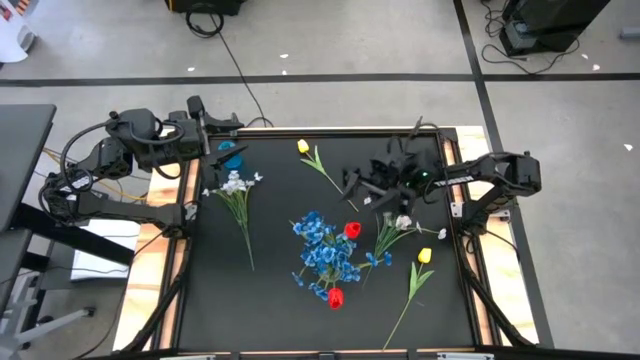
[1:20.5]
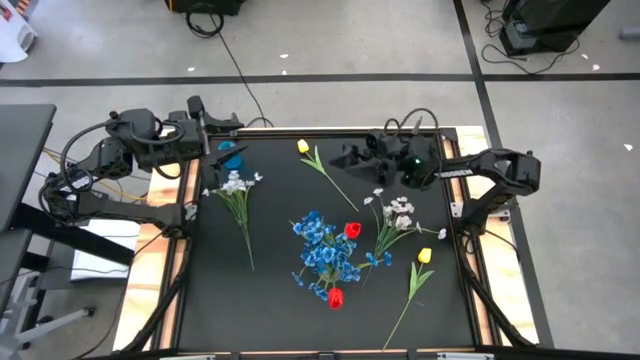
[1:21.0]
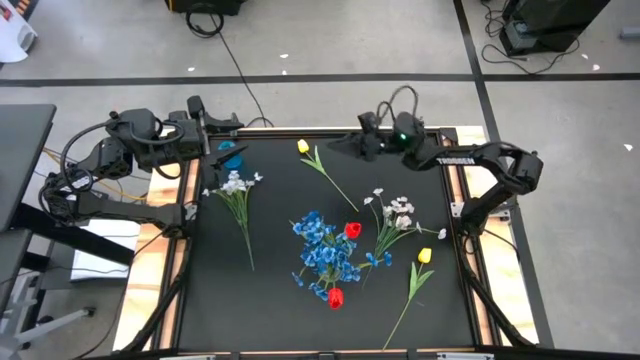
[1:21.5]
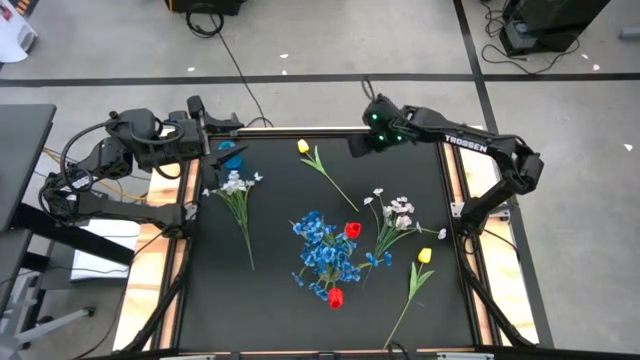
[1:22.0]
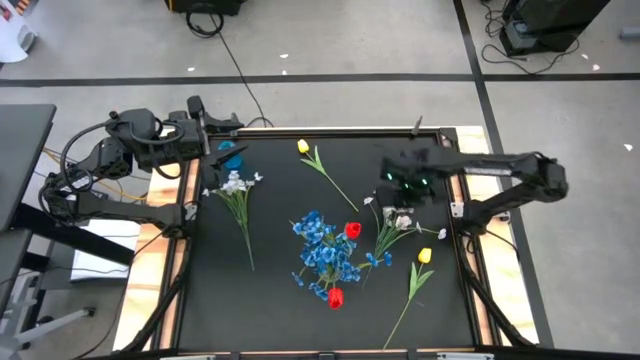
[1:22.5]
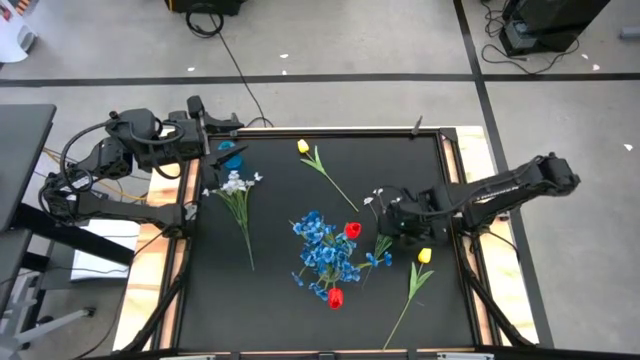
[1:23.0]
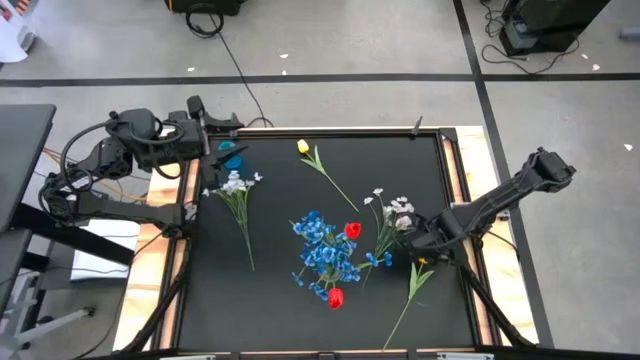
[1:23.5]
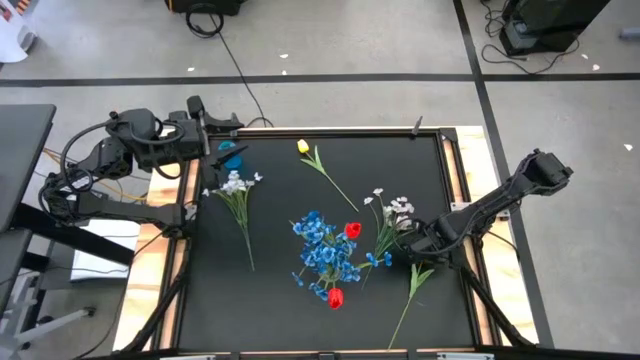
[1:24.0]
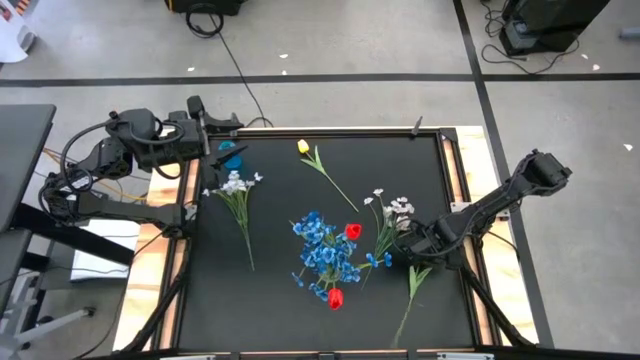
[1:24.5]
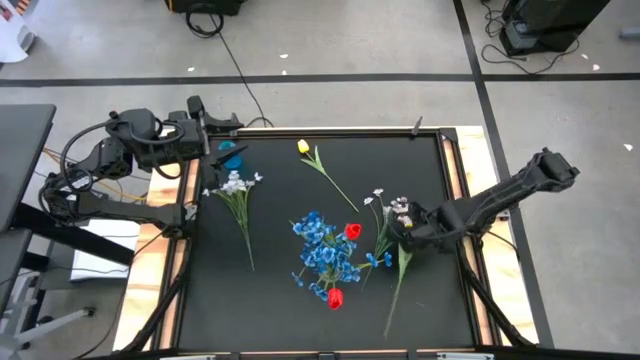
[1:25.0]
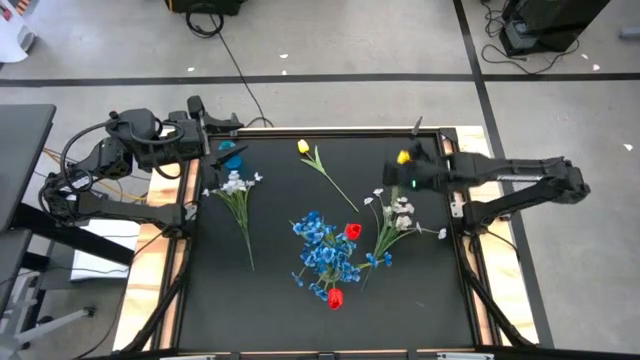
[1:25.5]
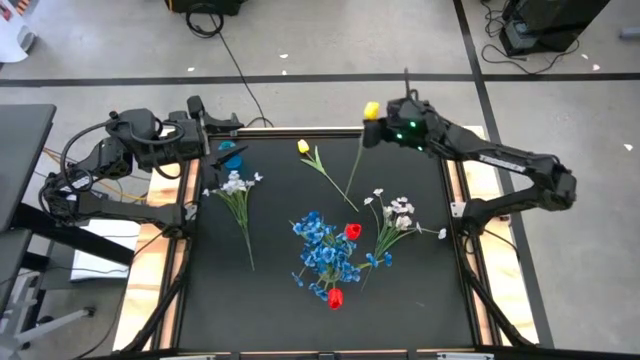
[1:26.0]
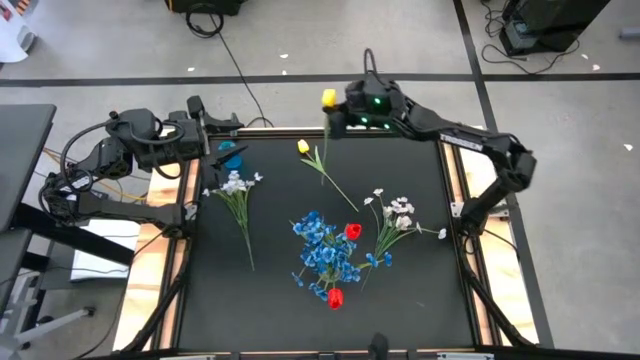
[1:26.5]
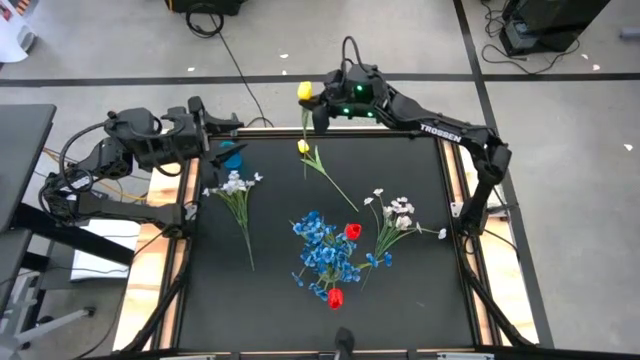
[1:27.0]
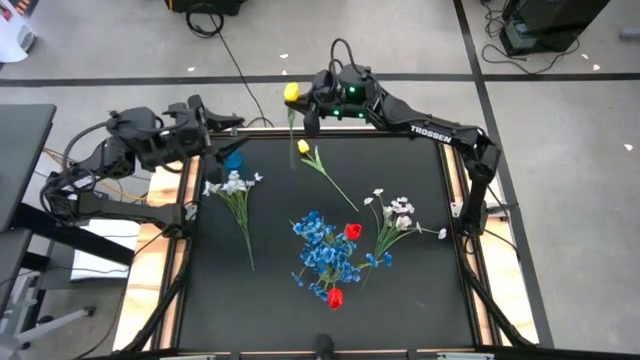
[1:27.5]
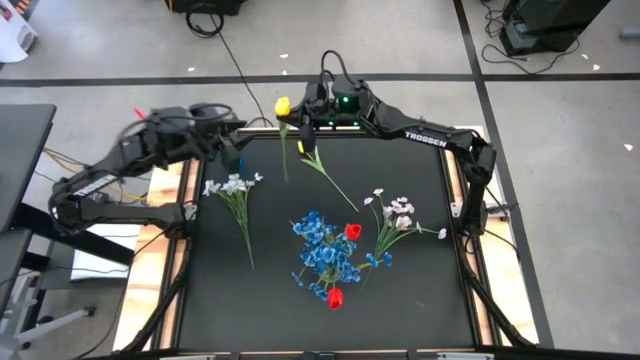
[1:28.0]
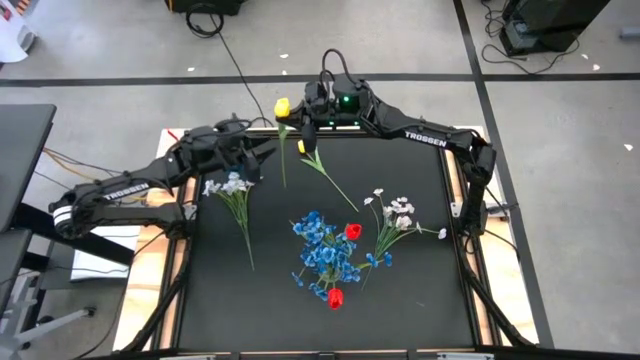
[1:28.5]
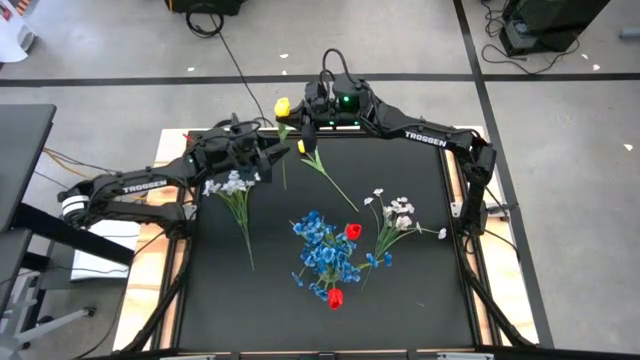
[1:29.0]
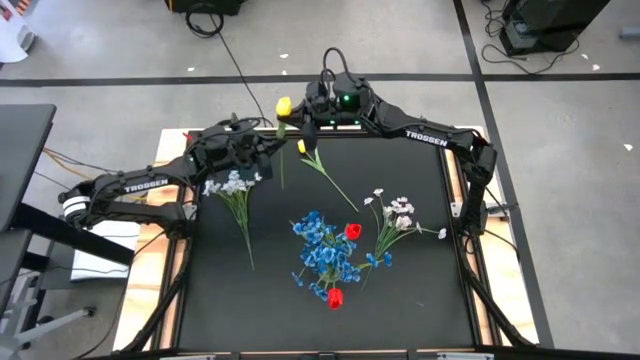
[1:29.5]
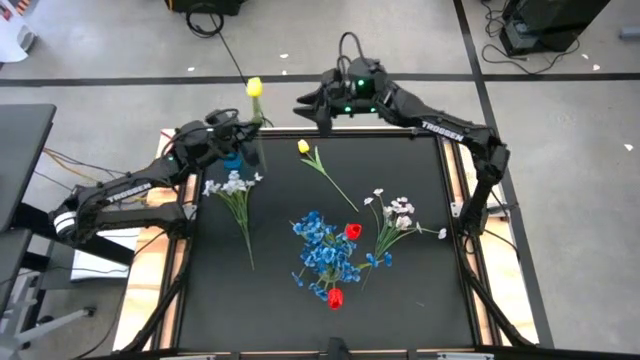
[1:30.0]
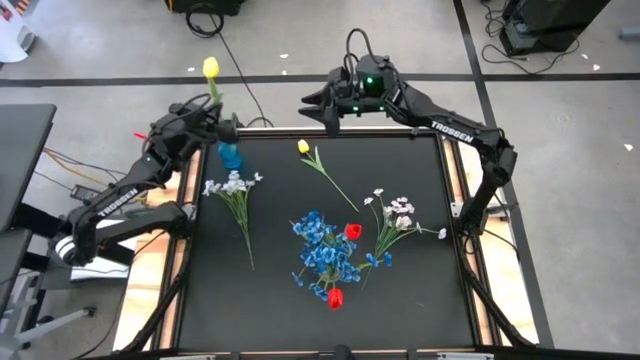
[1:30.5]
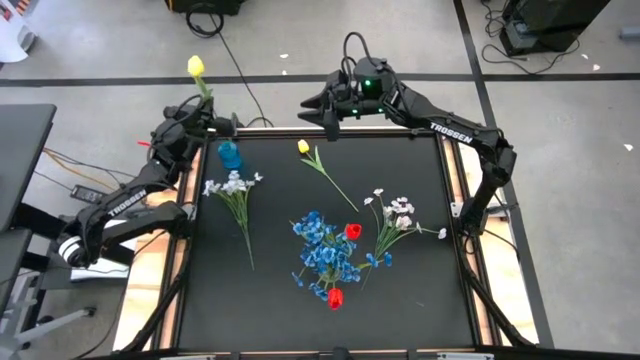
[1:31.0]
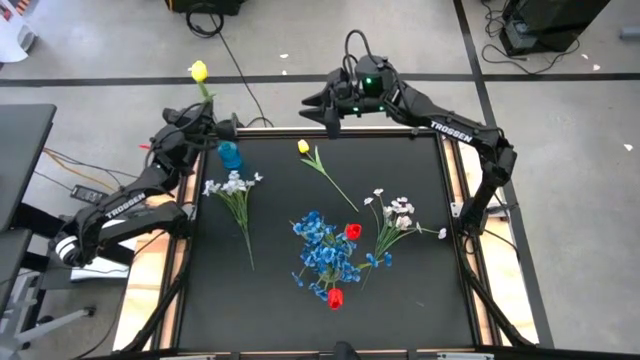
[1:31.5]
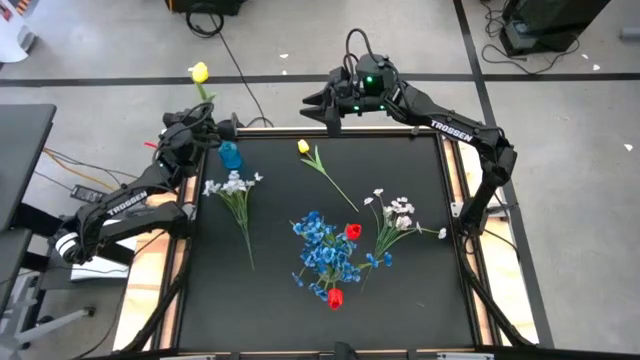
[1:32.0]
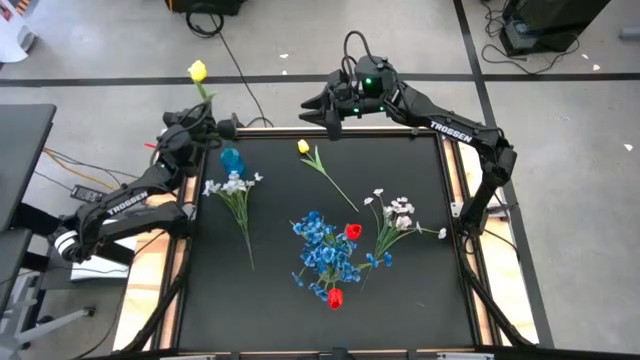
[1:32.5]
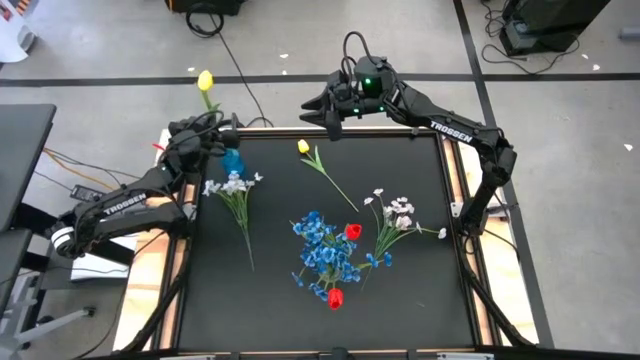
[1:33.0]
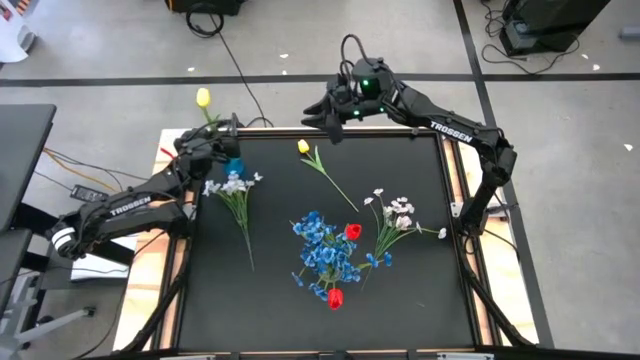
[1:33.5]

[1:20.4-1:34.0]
Task: Sort flowers into vase by color
Put the bottom yellow flower into the blue vase

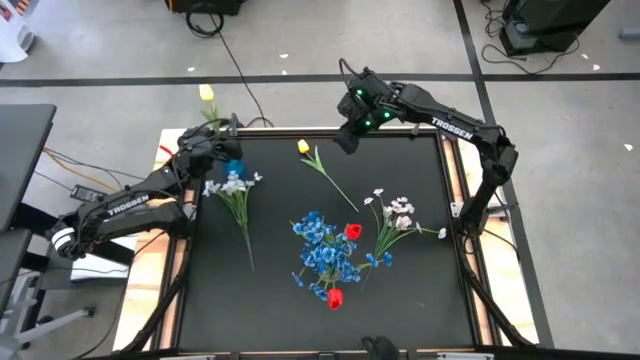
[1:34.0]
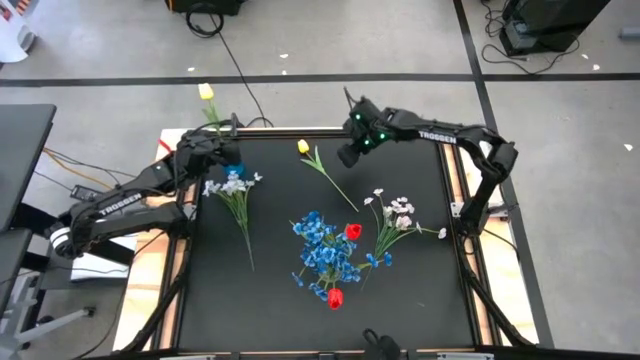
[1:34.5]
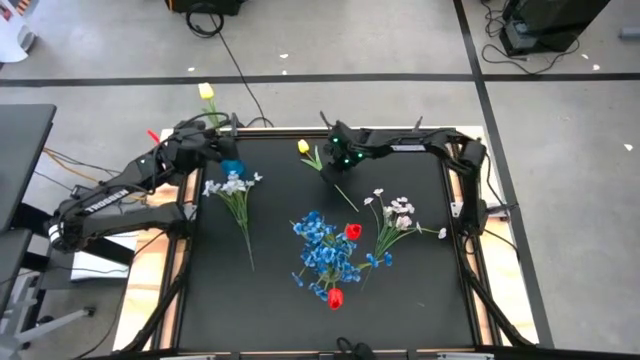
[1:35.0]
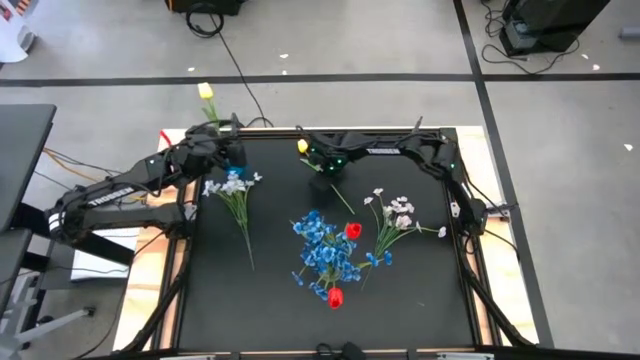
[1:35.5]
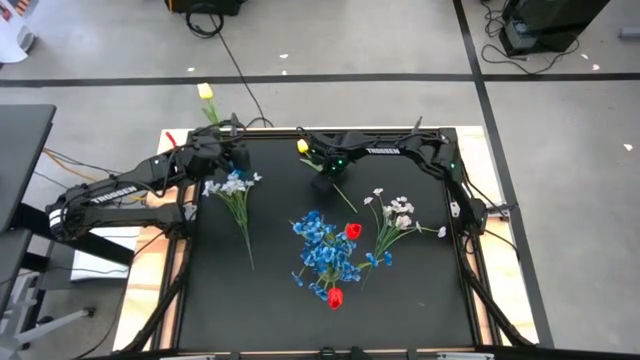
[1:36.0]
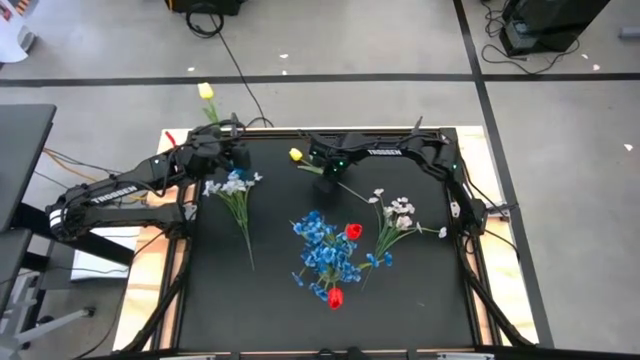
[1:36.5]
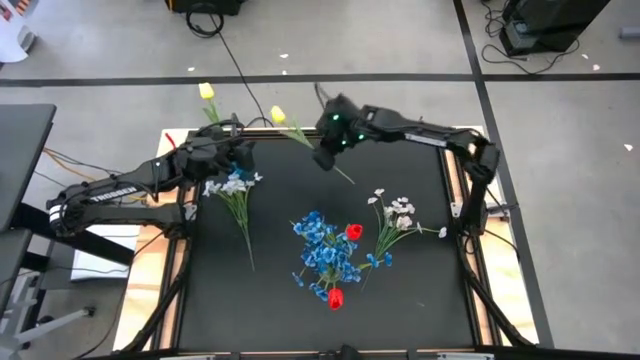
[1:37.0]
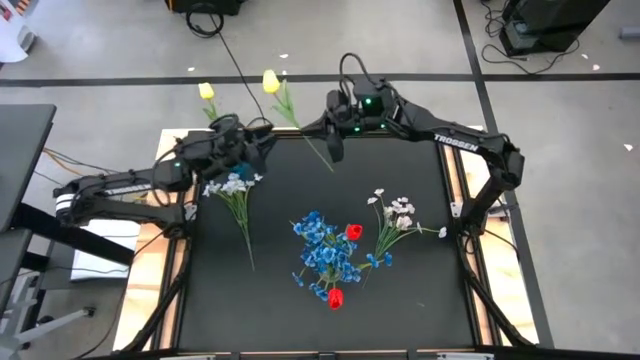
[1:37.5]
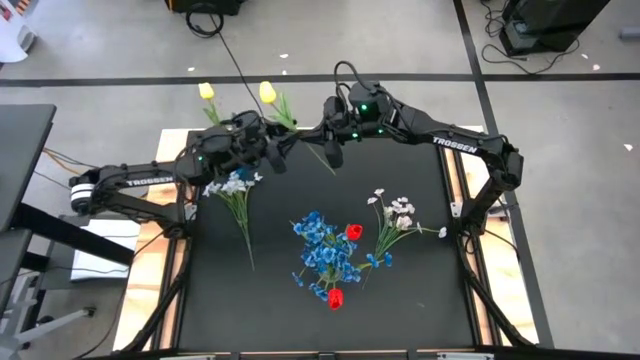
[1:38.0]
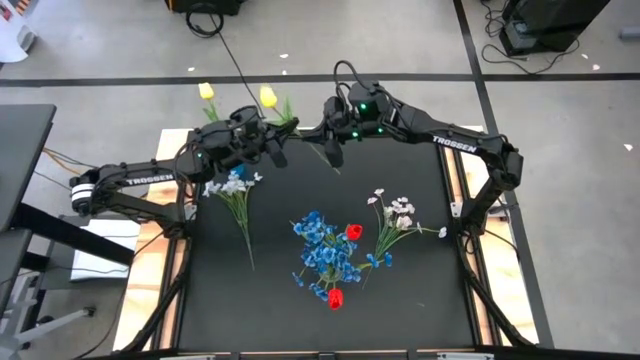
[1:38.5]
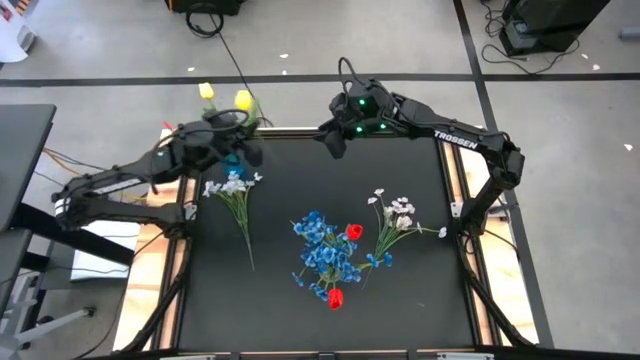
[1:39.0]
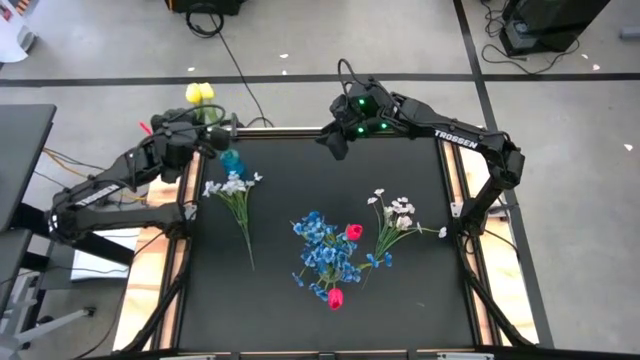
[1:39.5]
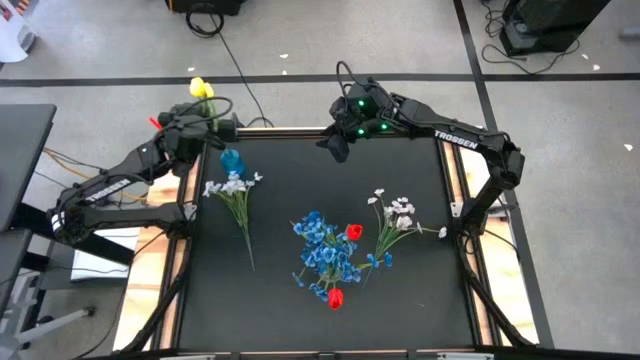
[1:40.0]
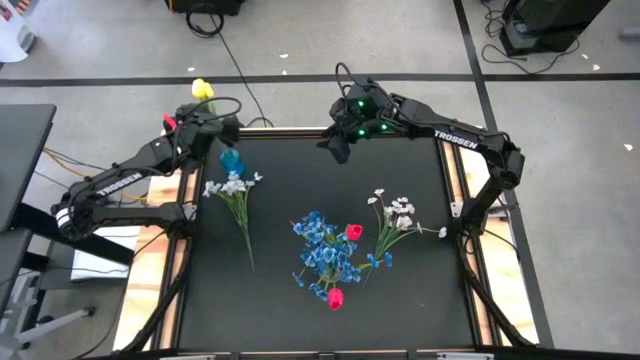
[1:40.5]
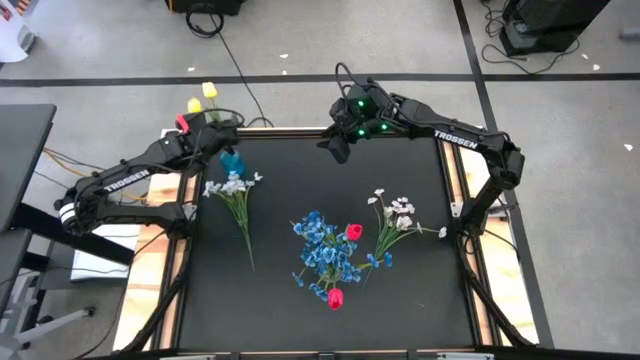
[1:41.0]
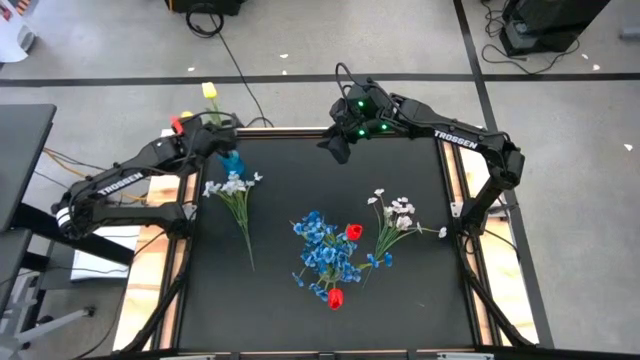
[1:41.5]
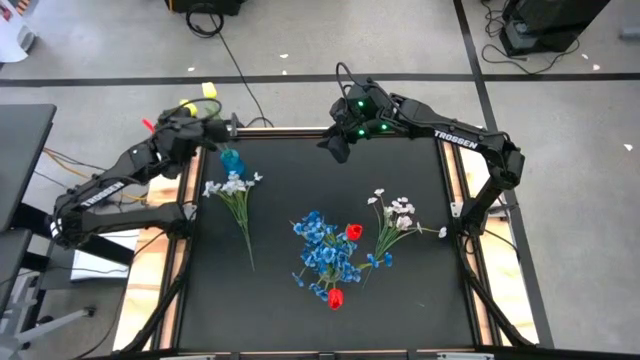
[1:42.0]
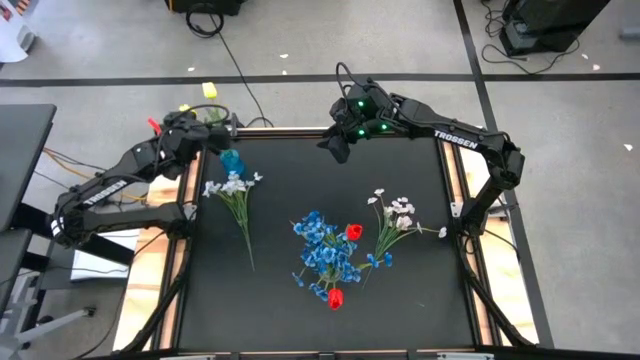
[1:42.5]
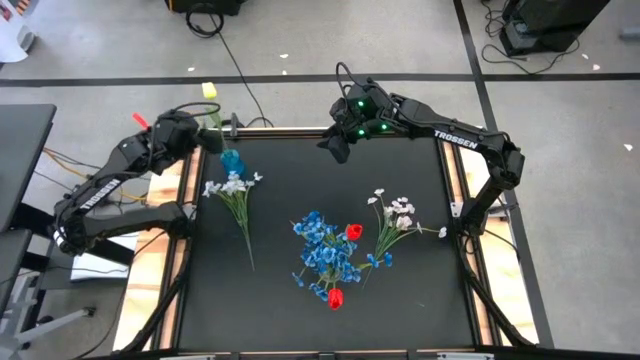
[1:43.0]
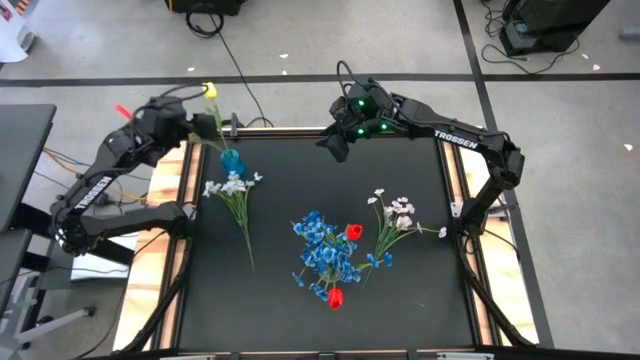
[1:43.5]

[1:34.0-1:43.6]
Put the yellow flower into the blue vase
